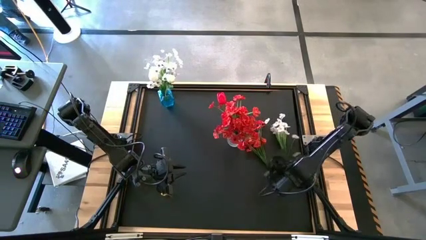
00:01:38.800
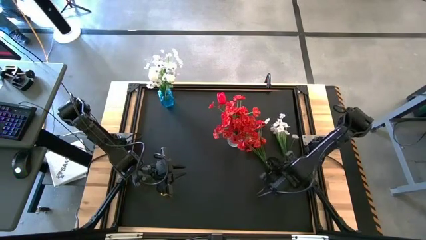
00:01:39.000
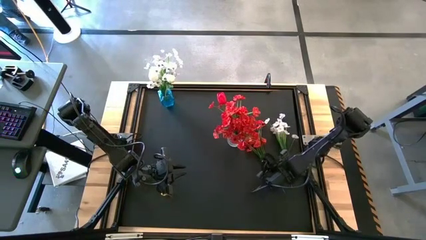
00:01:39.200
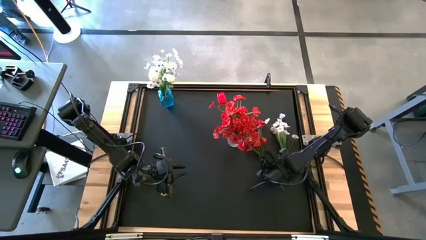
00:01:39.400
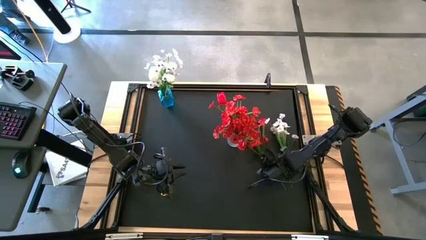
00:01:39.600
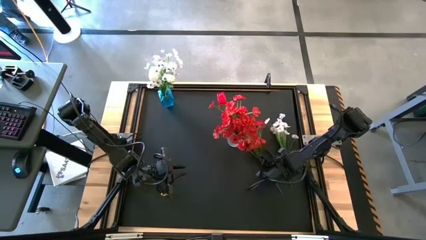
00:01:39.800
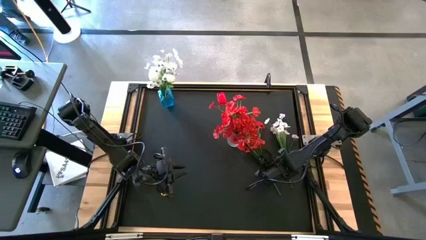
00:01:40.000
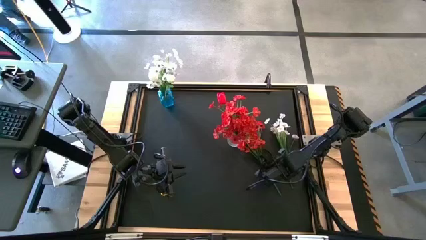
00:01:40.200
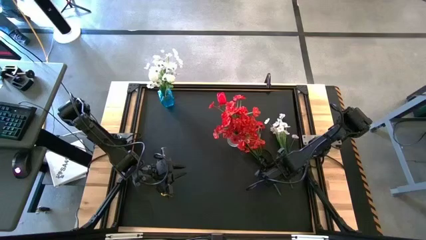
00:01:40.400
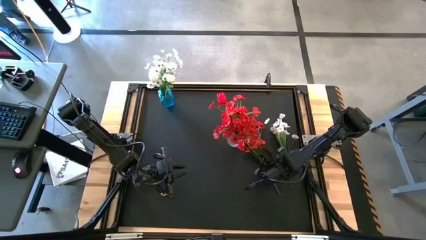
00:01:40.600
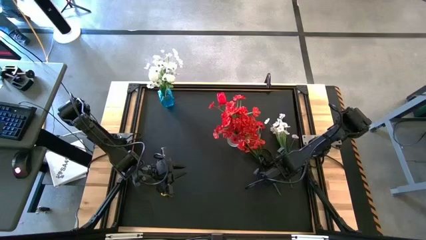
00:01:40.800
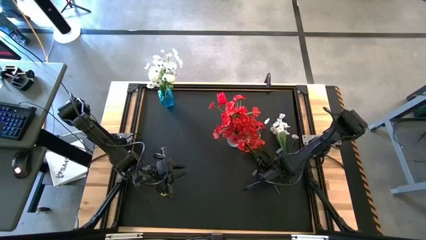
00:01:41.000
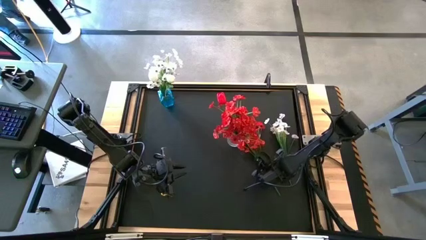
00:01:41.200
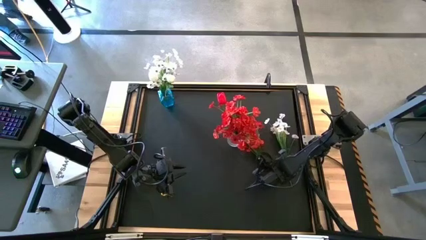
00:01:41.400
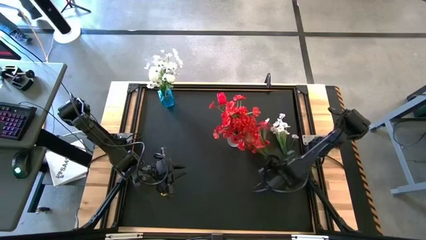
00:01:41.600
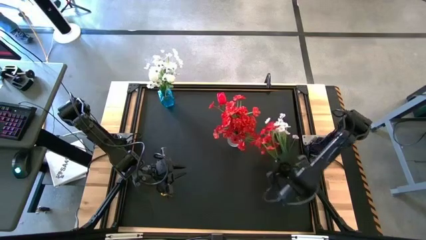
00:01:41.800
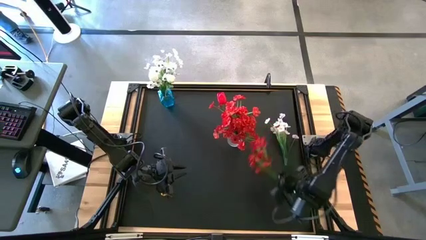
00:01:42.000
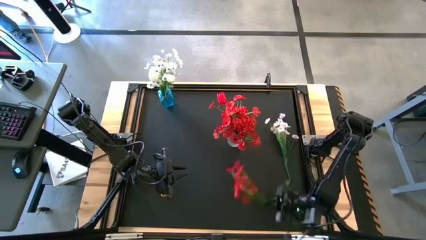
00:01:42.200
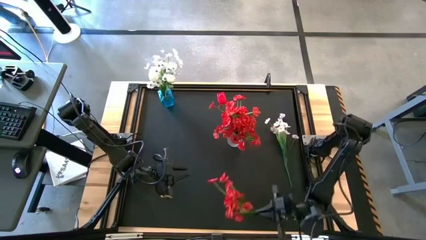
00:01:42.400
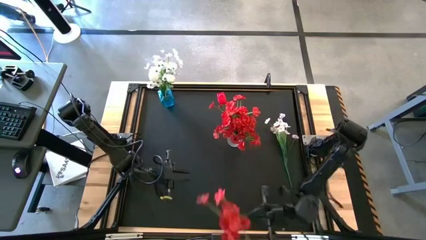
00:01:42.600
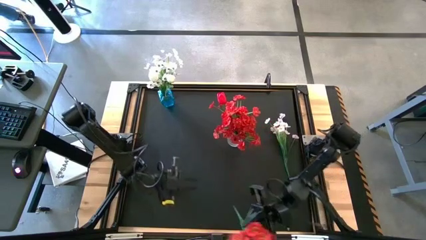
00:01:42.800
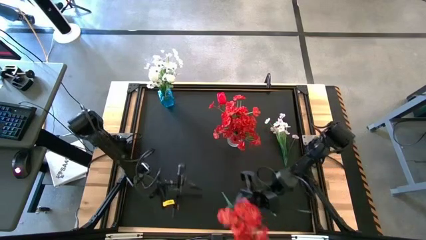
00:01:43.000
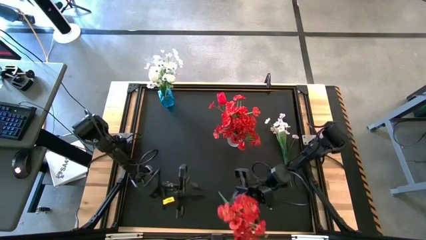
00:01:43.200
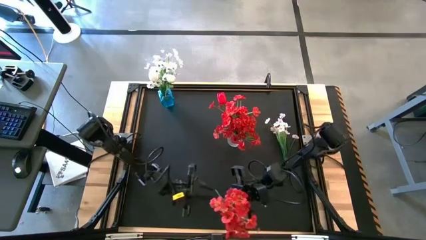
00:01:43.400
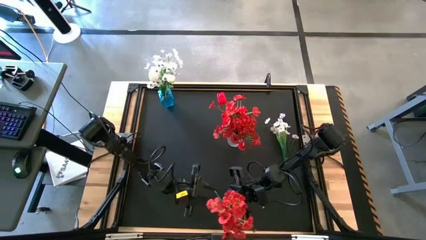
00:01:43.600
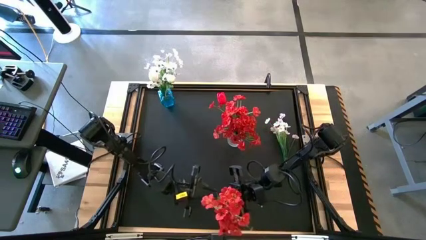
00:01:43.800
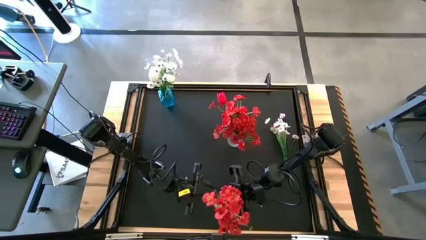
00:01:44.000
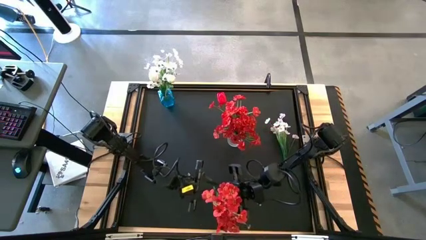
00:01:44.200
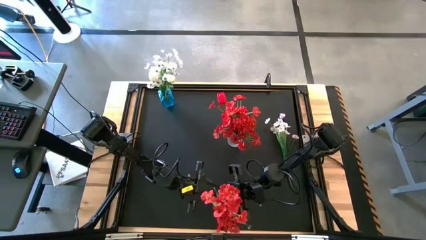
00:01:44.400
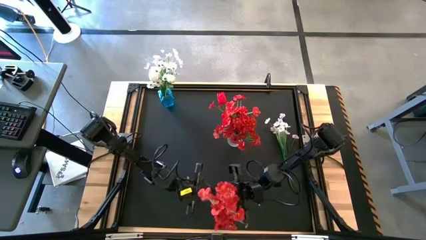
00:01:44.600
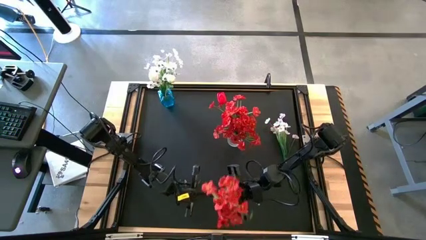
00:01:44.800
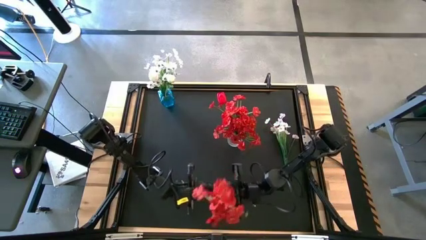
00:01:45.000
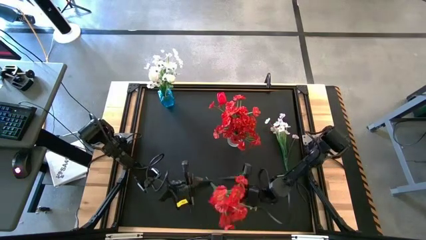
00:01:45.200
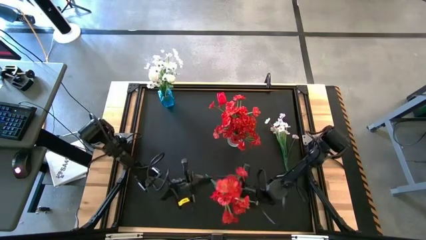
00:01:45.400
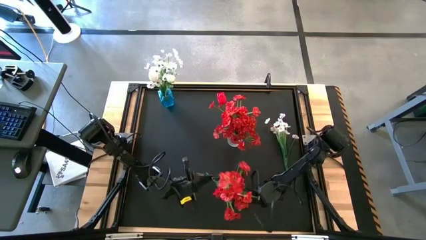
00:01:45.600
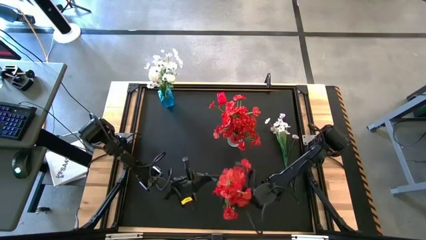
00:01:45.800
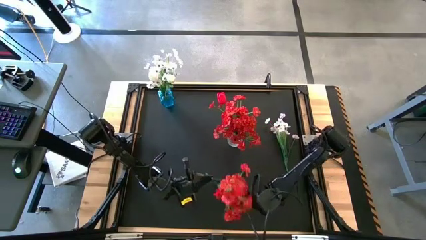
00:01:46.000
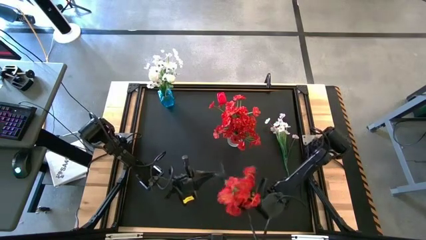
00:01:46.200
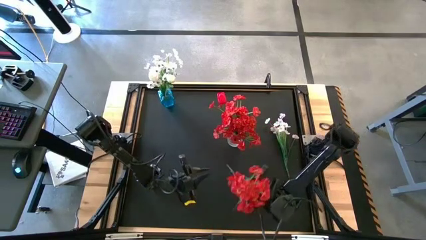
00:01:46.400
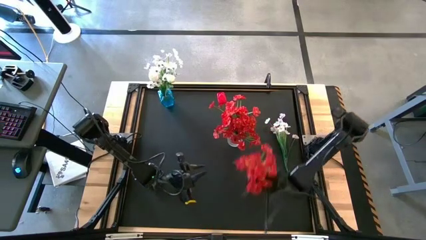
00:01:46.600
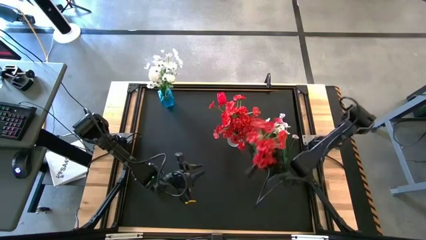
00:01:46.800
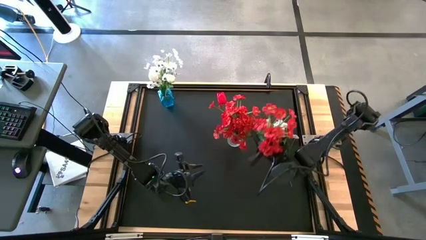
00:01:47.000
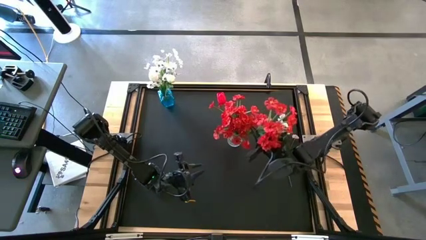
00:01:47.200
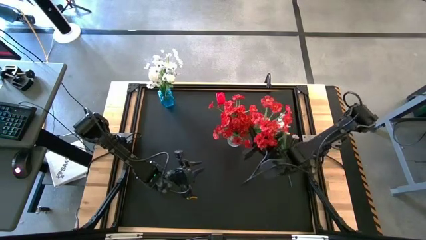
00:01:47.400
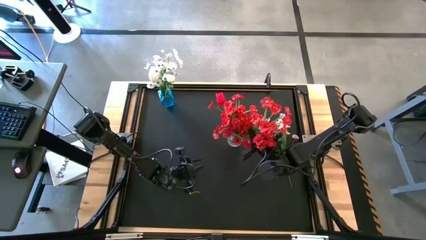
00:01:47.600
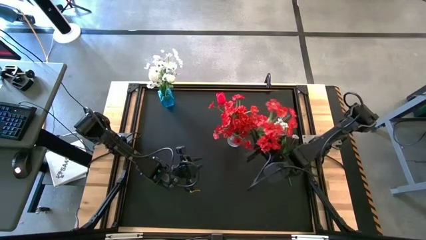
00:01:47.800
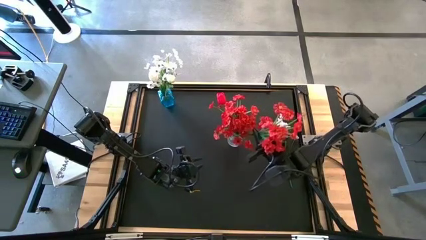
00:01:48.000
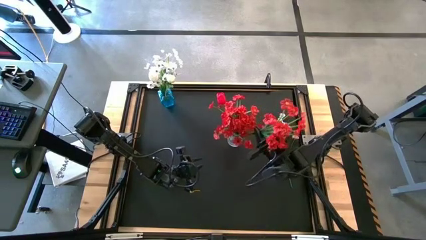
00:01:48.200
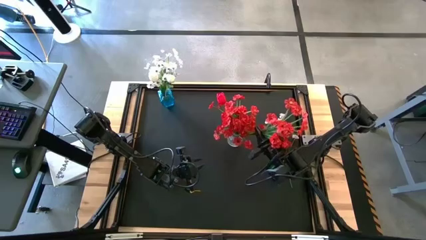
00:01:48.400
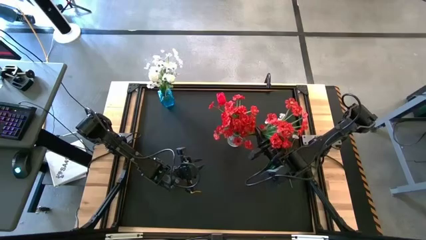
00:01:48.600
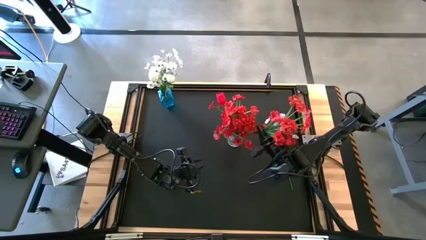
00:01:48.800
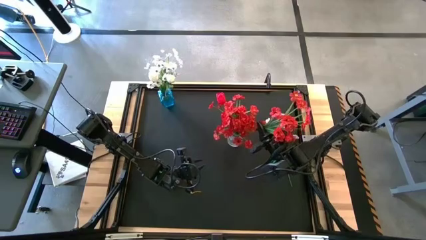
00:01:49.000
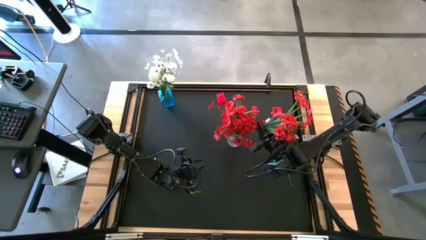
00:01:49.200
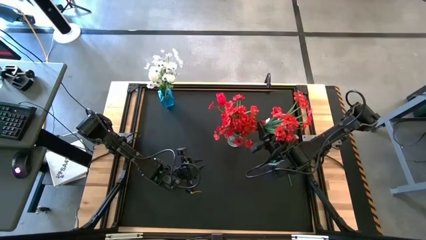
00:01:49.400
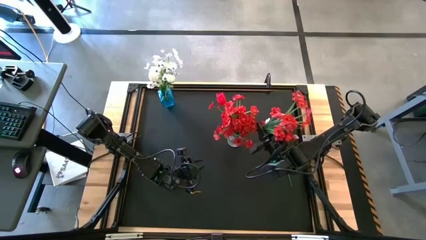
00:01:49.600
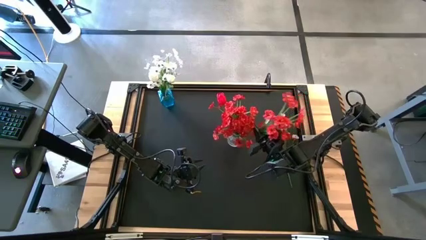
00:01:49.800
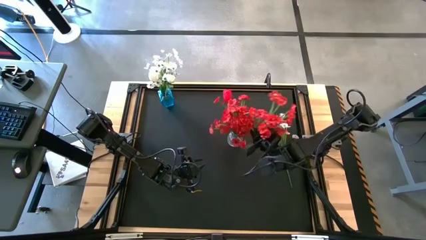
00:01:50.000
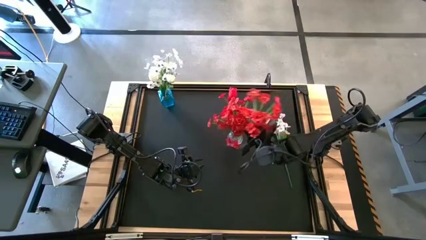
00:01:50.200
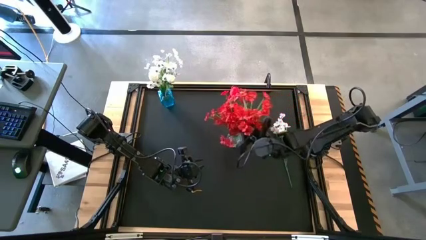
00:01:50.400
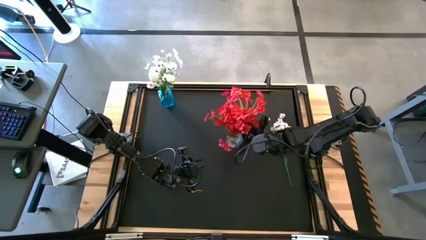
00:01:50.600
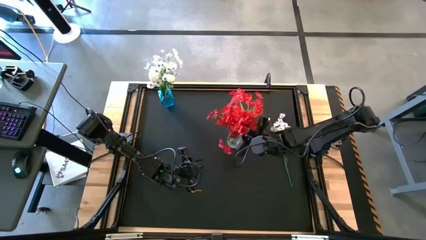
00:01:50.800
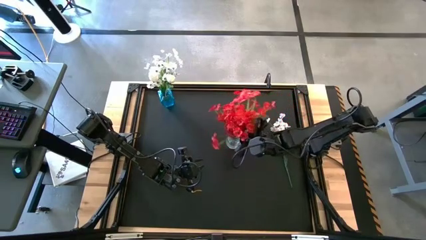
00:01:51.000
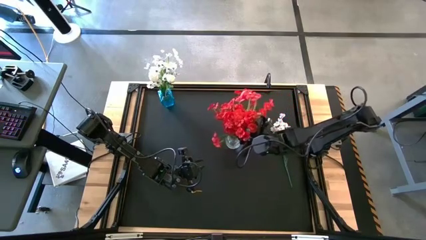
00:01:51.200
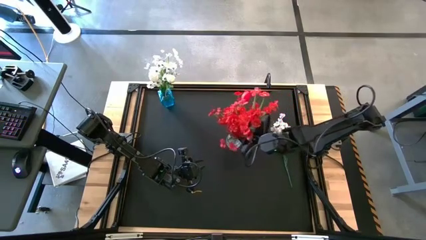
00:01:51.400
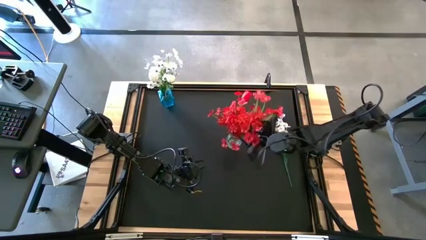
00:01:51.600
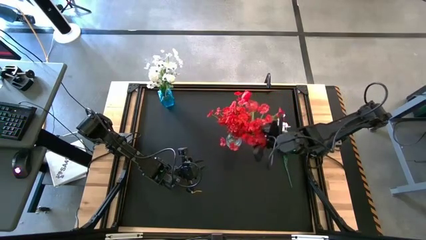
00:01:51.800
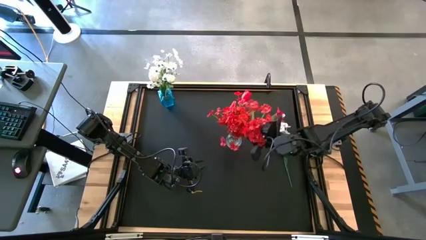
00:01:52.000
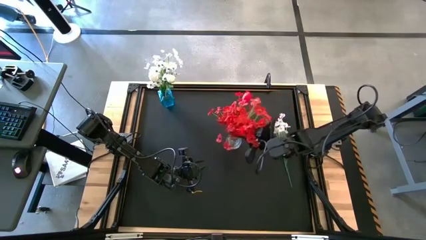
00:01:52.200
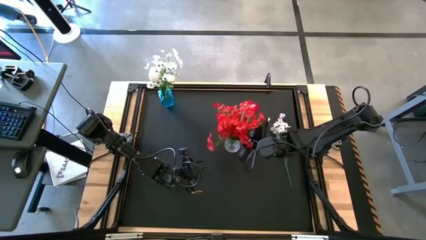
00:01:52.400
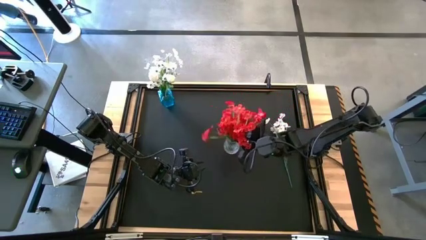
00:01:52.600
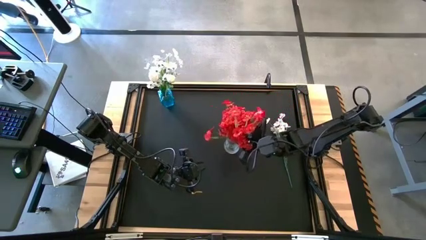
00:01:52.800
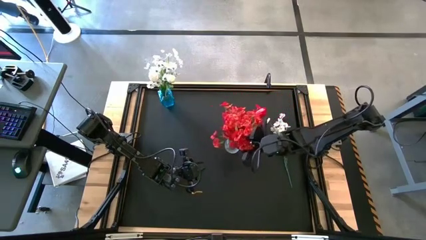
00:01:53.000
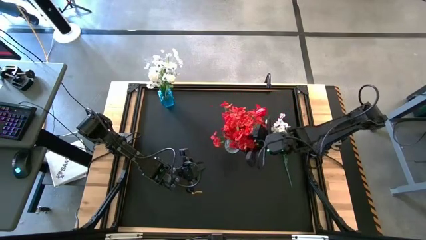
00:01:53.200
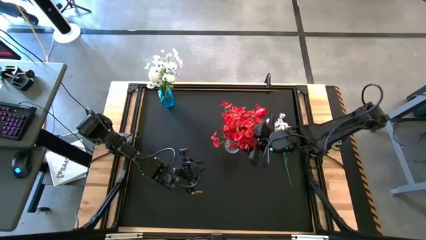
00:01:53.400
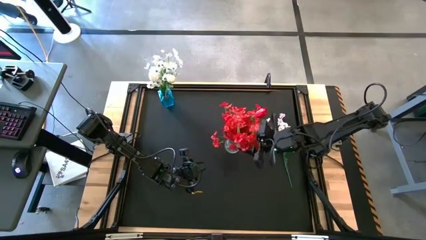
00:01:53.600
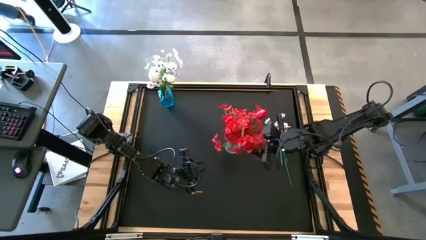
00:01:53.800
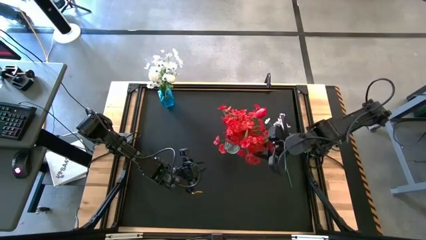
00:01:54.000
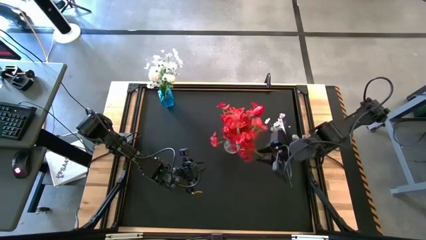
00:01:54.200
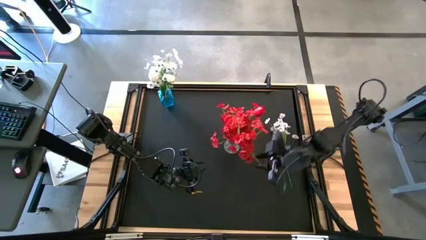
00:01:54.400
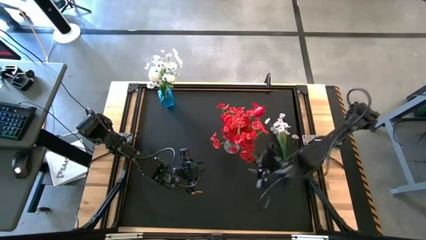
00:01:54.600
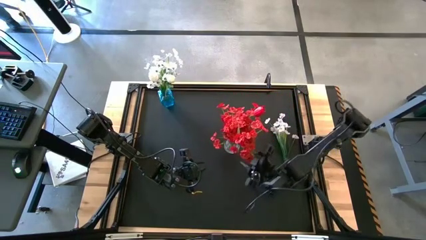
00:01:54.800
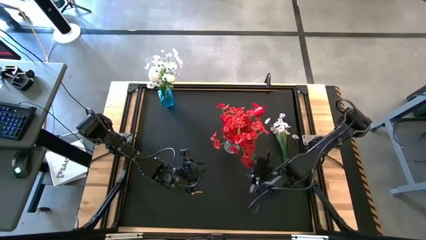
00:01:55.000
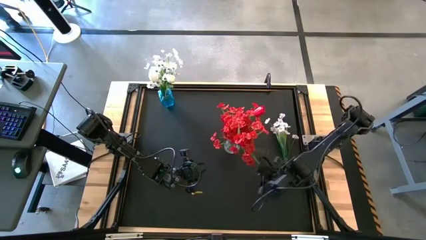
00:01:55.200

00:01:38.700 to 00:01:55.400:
Task: Sort flowers into vase by color
Put the red flowers into the transparent vase
